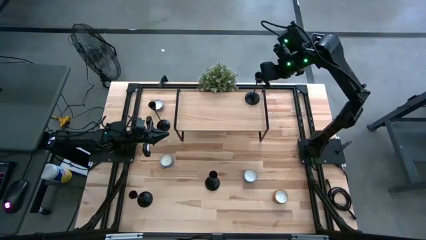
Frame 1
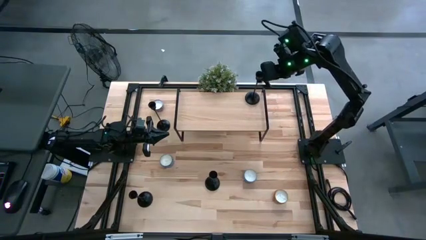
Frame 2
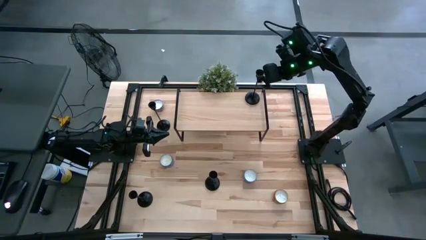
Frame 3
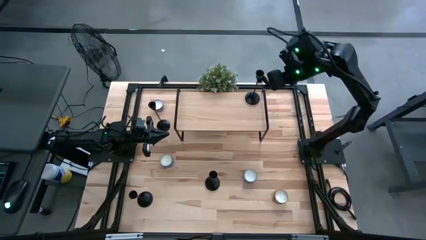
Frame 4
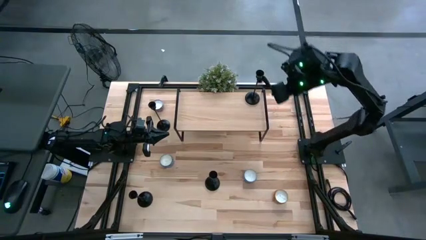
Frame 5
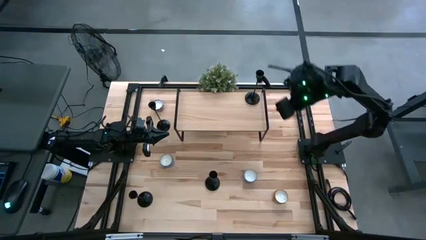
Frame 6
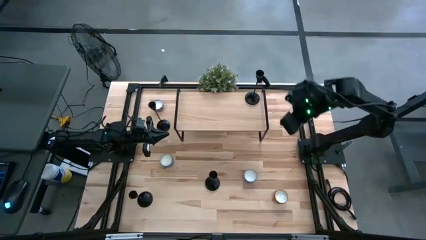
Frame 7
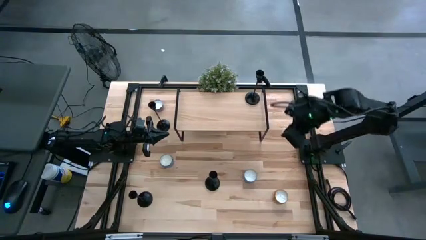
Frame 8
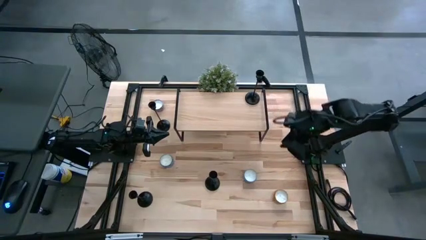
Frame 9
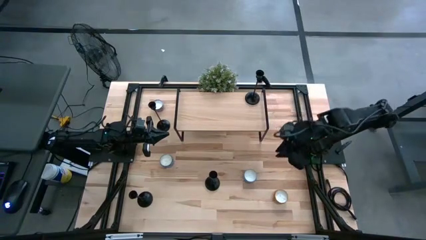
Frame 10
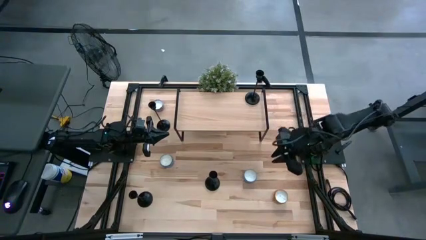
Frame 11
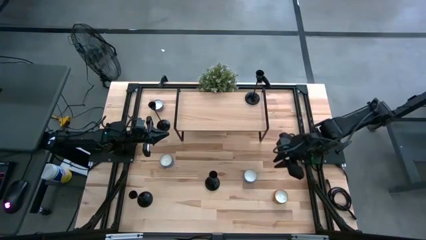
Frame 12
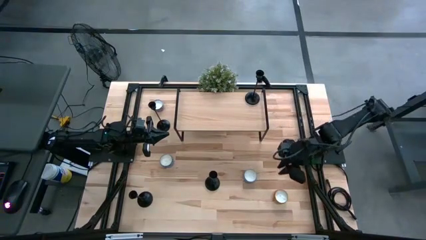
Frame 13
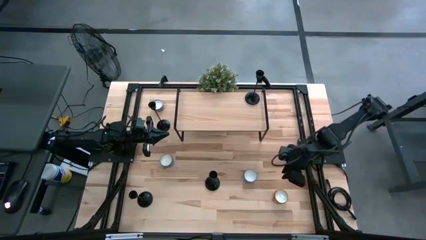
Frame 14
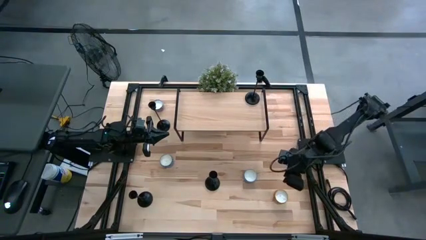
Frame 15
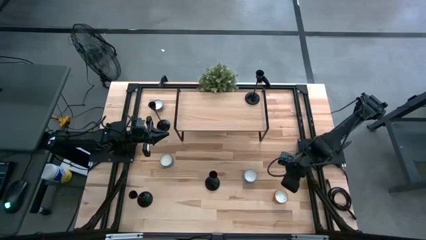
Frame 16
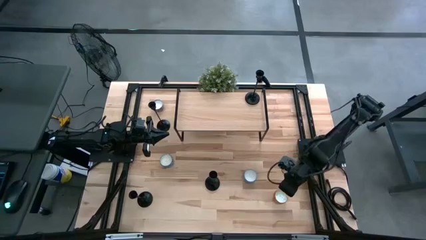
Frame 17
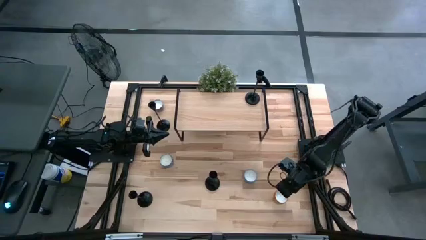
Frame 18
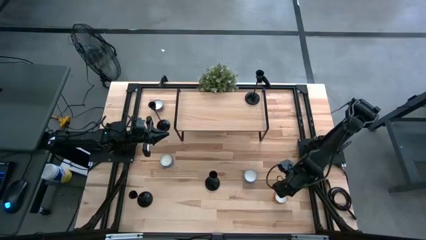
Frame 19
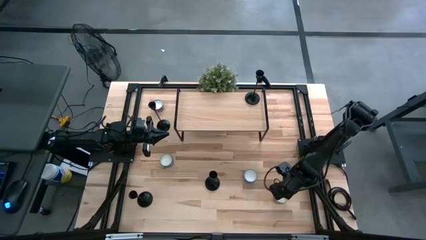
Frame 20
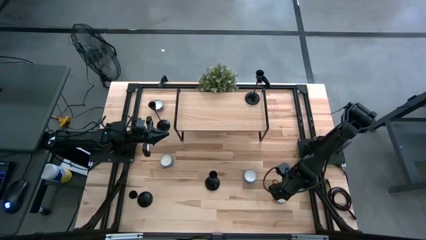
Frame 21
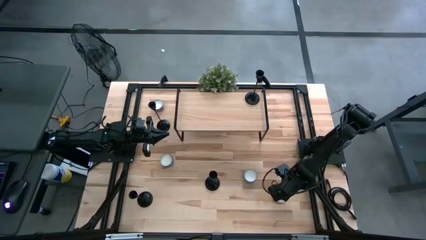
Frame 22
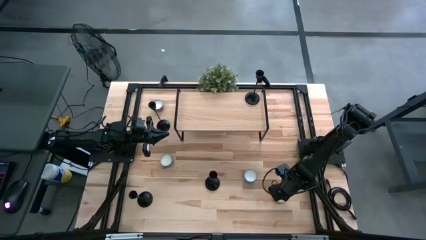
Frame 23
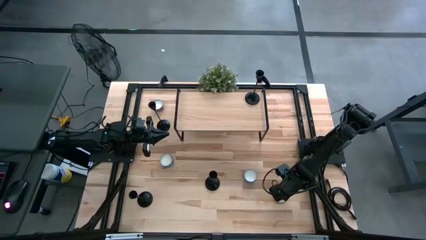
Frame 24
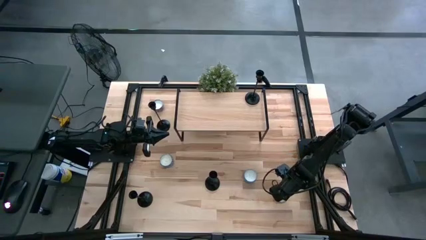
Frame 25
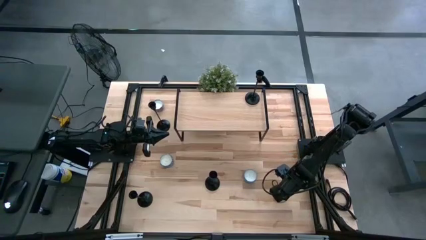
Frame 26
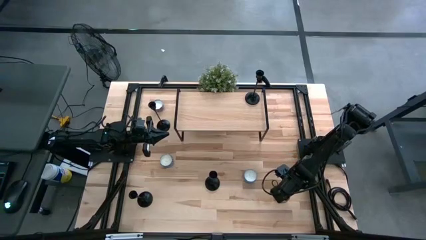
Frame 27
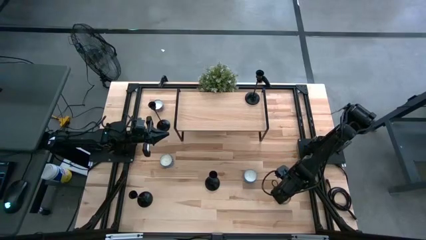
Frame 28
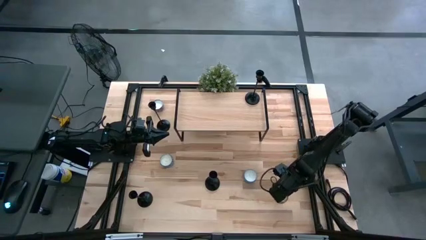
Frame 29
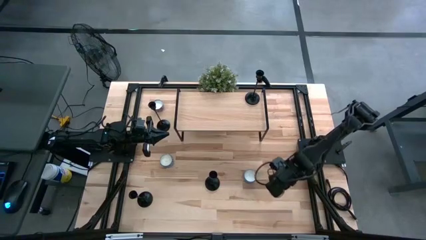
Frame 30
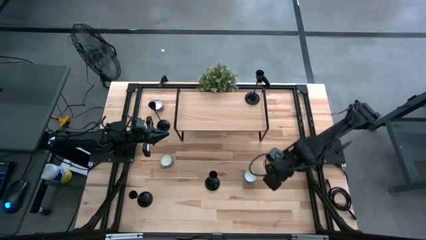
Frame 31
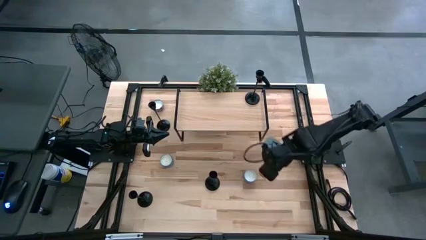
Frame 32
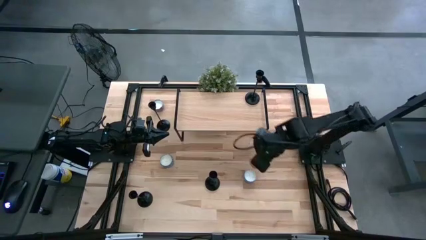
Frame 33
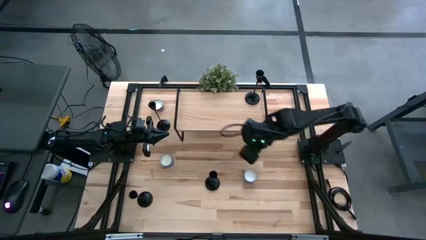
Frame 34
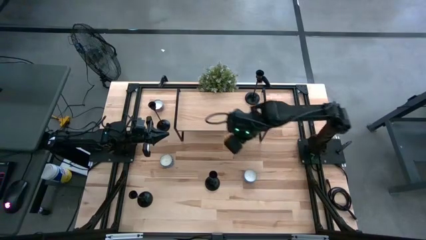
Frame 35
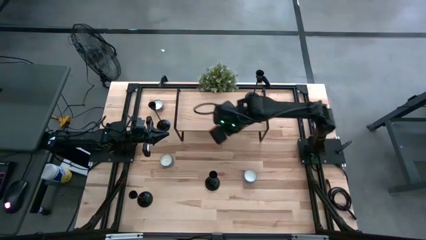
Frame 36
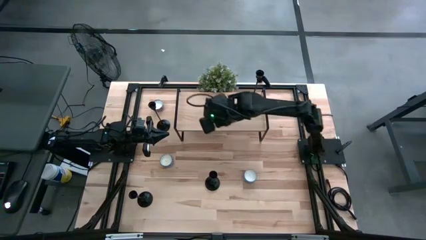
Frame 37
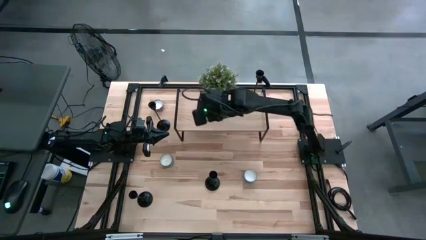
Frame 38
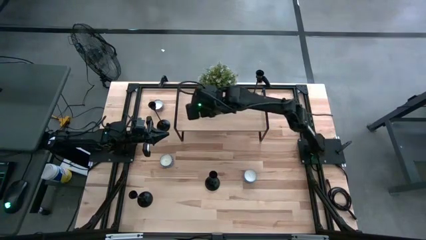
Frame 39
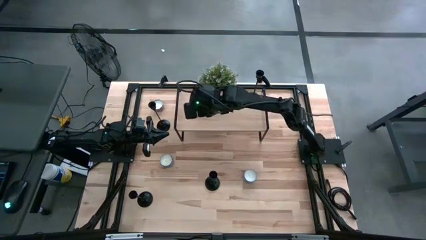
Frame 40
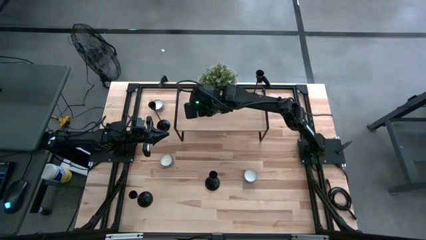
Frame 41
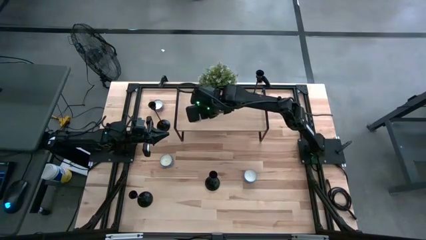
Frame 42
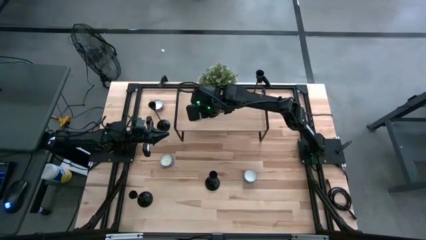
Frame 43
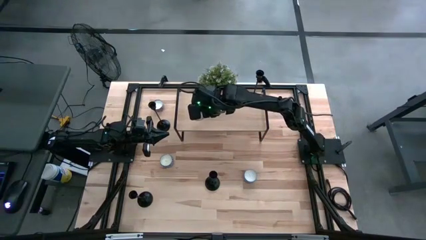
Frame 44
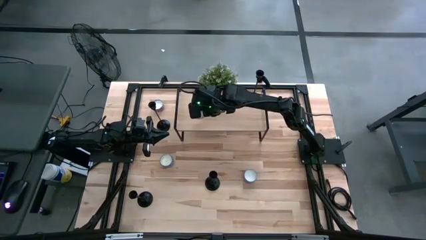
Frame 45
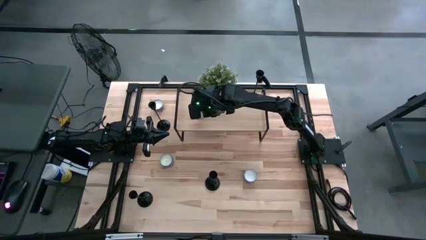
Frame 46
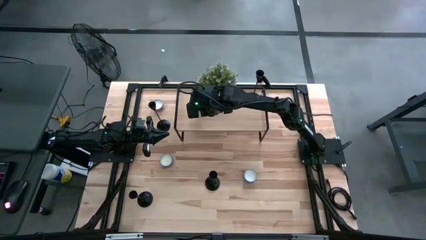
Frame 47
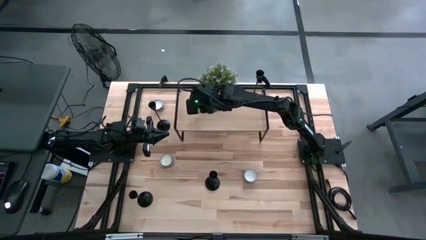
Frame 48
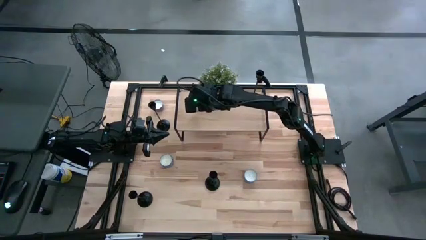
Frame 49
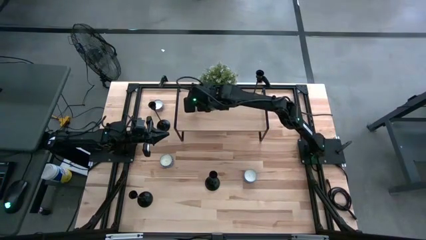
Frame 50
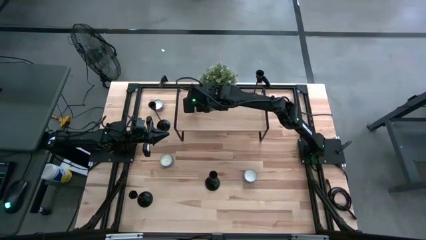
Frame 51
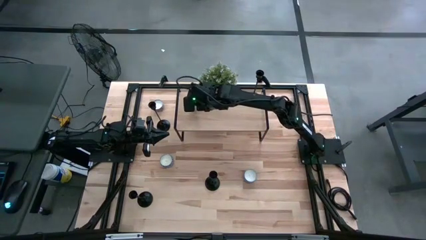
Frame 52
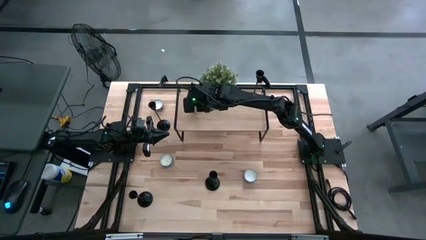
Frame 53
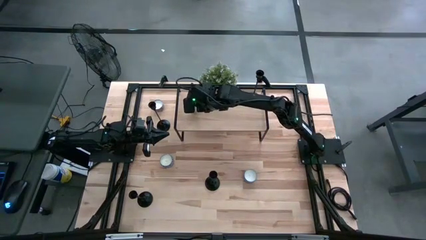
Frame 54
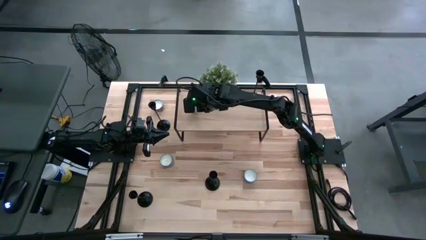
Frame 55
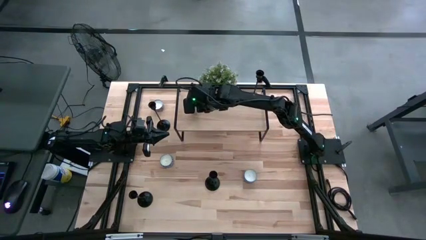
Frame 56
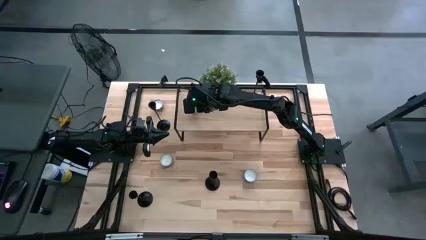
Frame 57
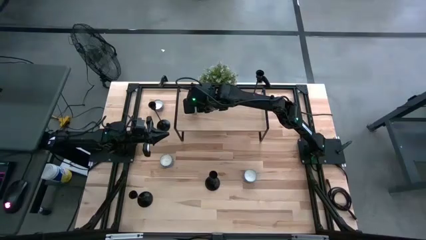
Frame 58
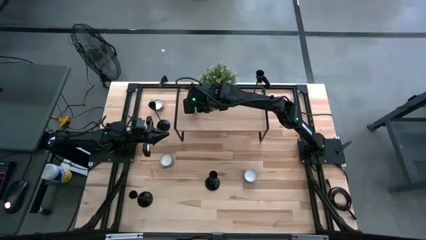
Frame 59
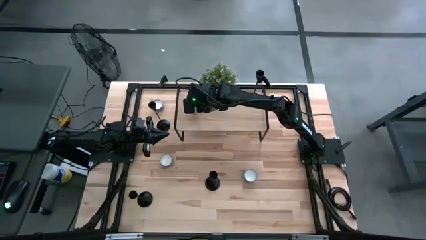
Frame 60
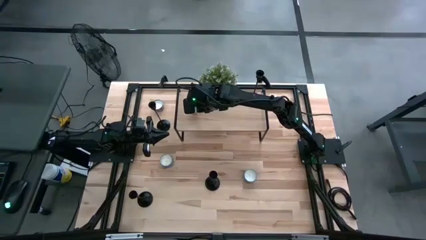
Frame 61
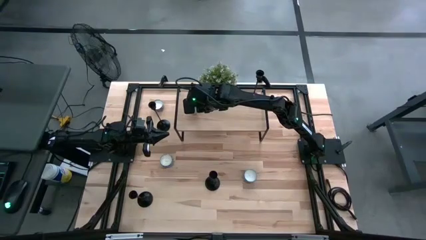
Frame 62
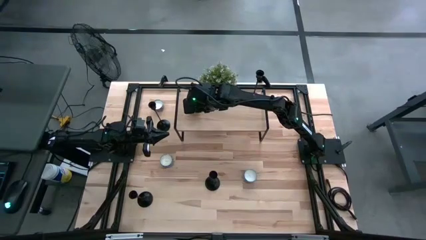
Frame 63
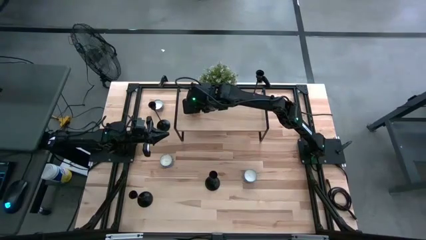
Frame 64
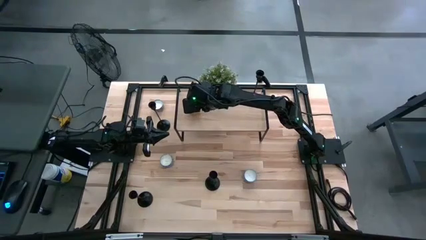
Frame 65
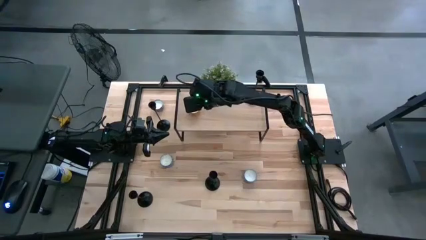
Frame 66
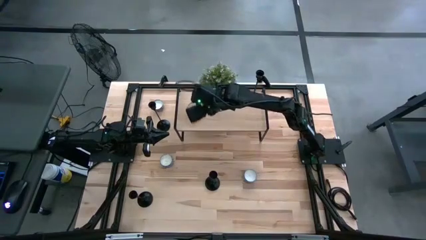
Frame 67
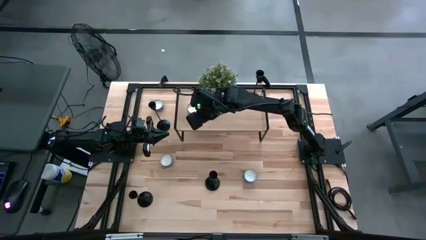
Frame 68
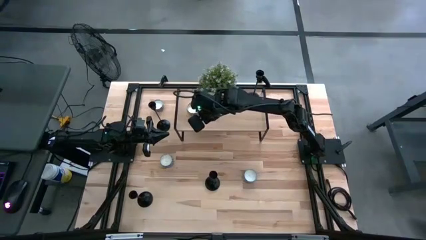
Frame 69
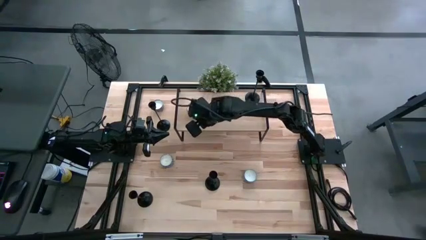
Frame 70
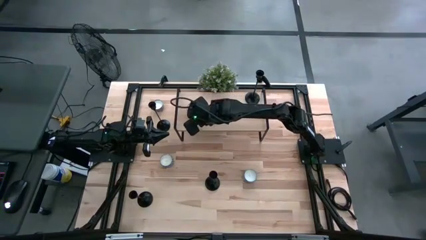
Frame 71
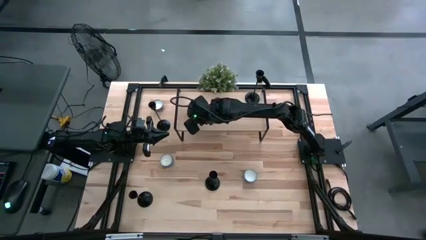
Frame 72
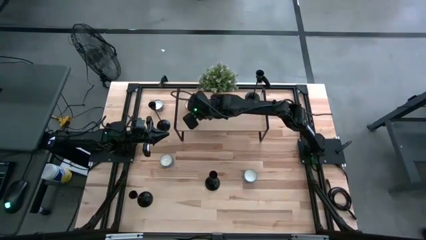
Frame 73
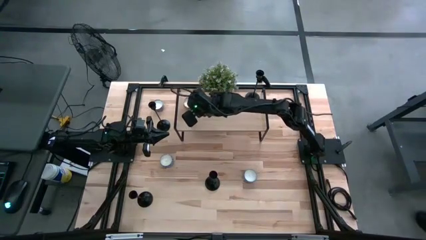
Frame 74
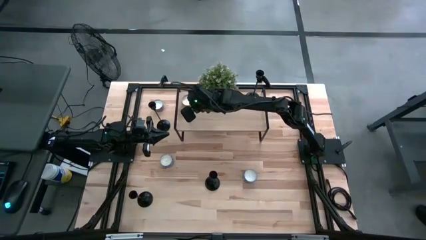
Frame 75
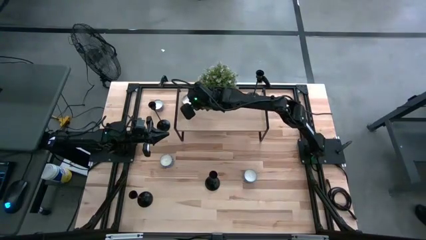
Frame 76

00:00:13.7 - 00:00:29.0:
Task: Pick & Place candle stick holders
Put the orange scented candle on the shelf

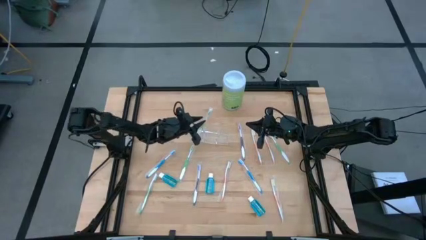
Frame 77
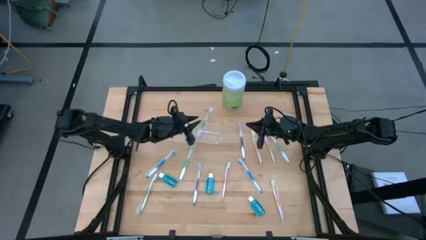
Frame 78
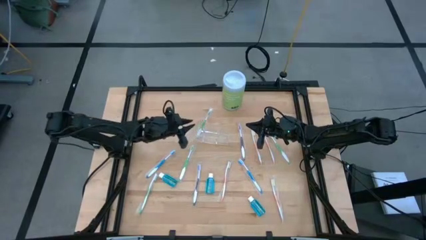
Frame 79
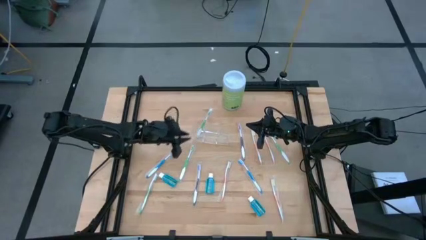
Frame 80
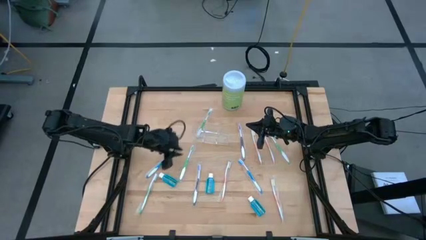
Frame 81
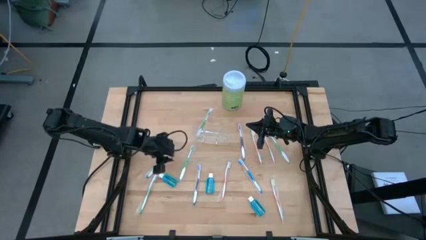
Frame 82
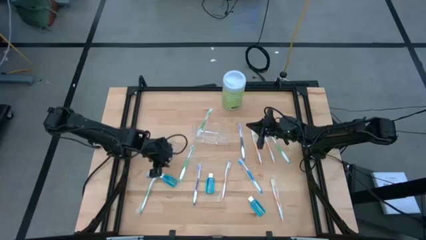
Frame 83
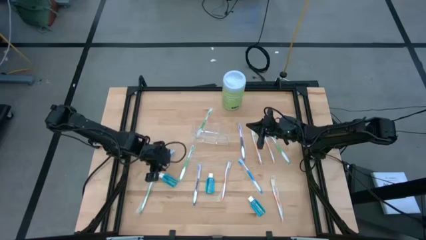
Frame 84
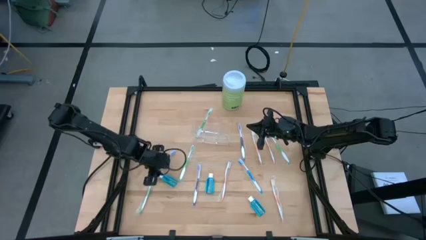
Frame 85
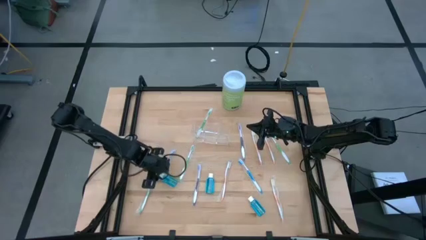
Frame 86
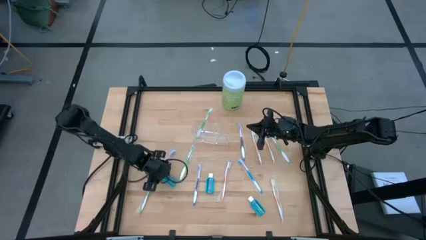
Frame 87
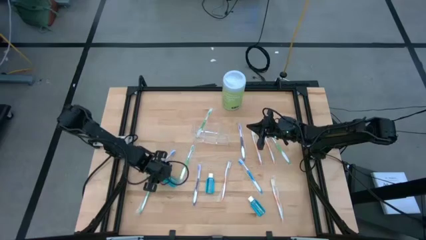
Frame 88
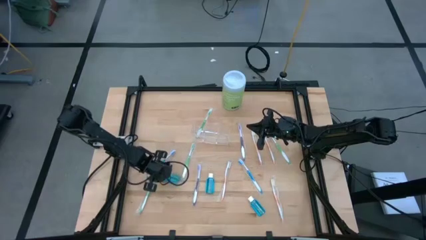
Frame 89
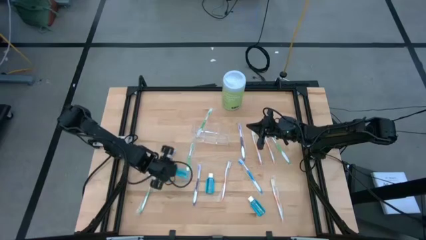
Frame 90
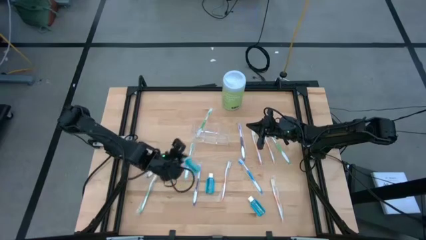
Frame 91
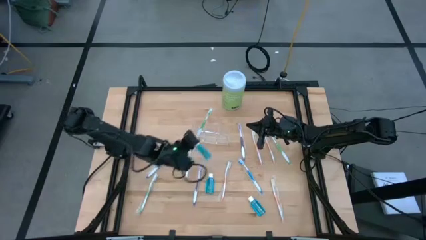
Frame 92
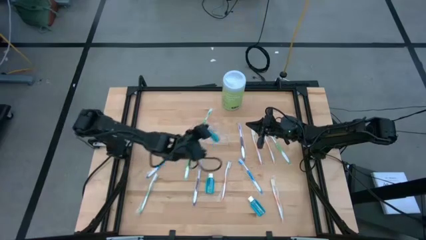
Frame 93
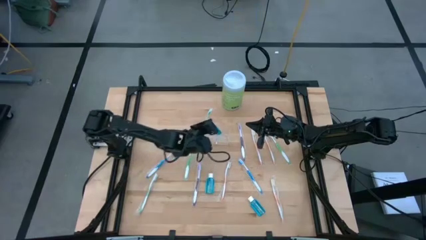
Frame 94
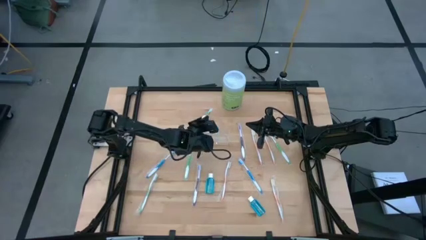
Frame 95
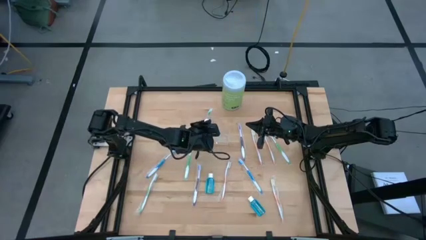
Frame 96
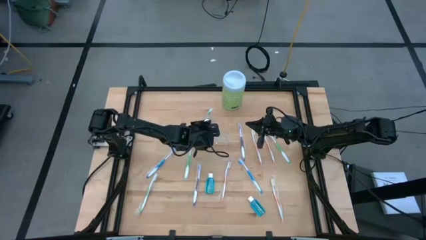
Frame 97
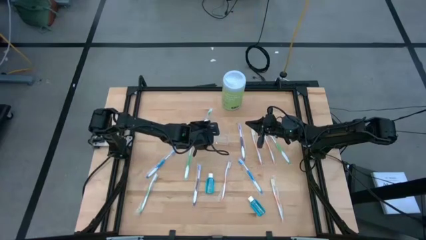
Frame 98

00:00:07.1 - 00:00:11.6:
Task: Pick & Place toothbrushing station
Put the blue mouthwash into the transparent organizer
